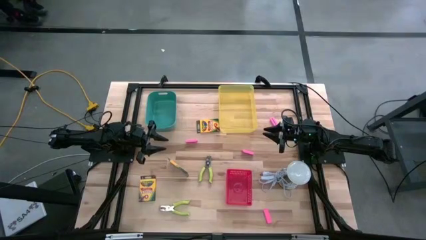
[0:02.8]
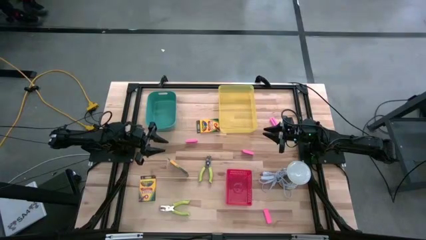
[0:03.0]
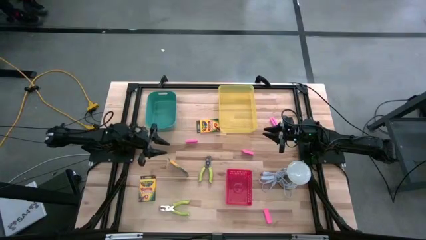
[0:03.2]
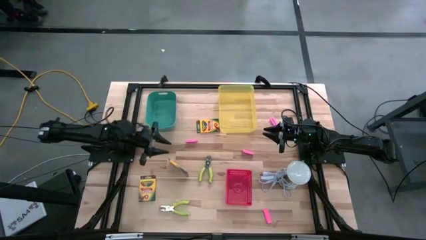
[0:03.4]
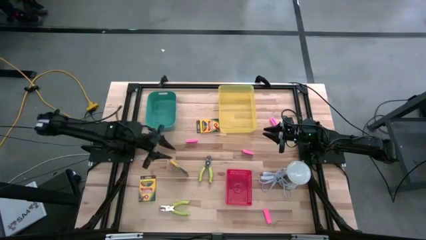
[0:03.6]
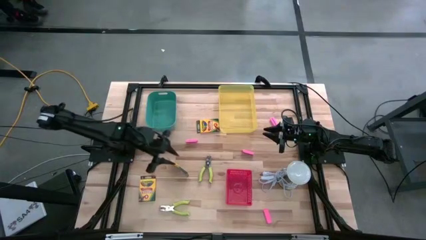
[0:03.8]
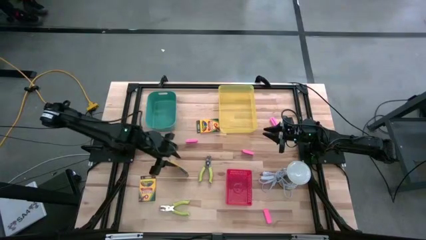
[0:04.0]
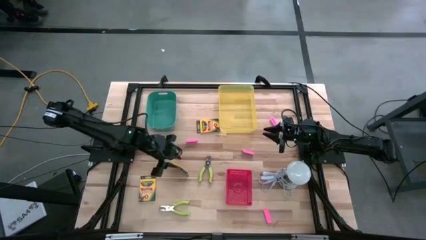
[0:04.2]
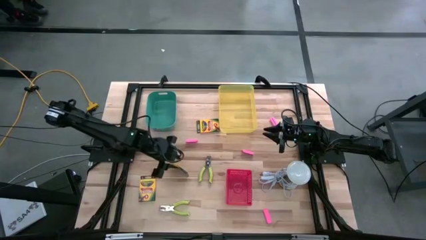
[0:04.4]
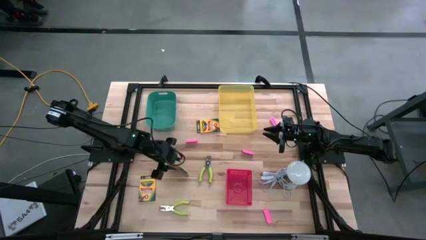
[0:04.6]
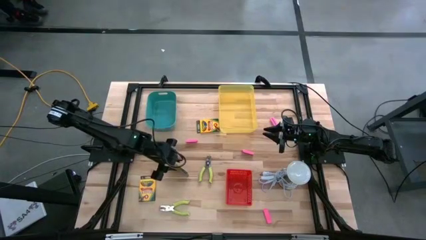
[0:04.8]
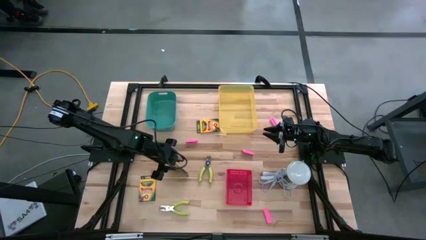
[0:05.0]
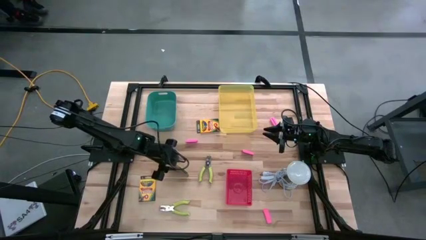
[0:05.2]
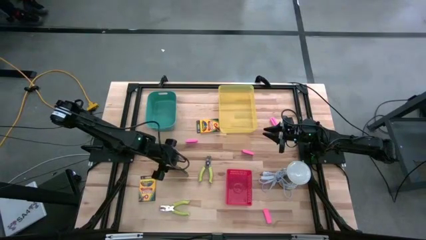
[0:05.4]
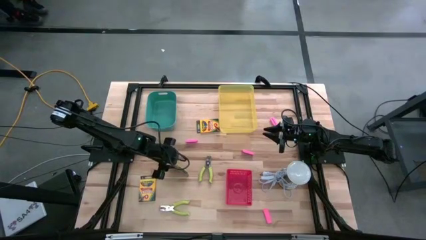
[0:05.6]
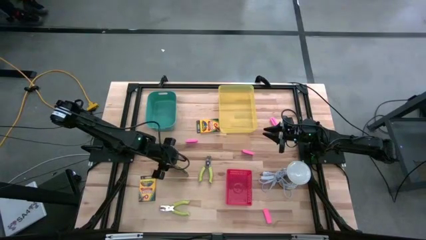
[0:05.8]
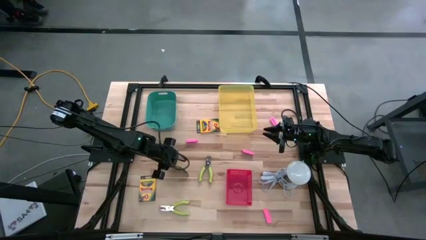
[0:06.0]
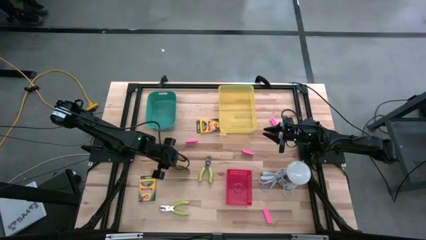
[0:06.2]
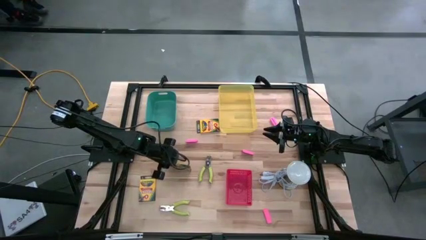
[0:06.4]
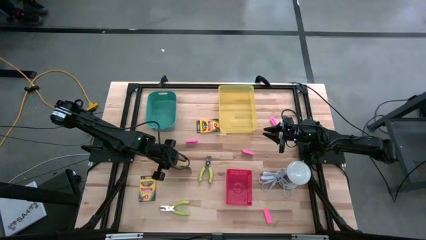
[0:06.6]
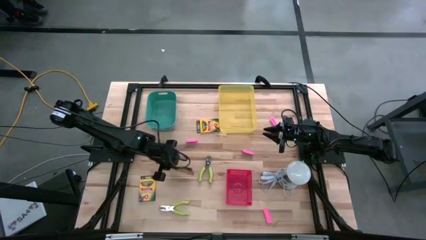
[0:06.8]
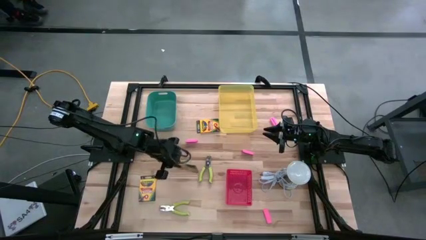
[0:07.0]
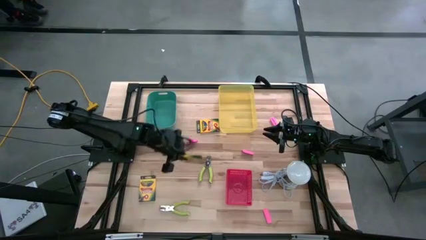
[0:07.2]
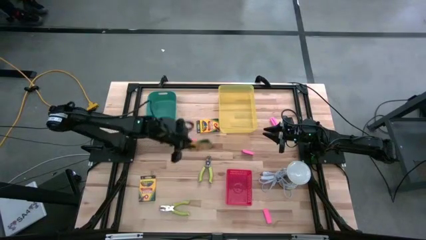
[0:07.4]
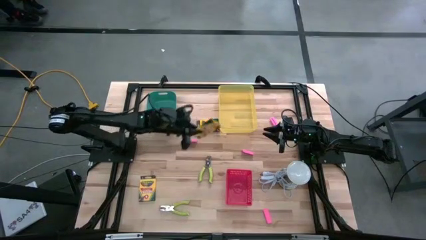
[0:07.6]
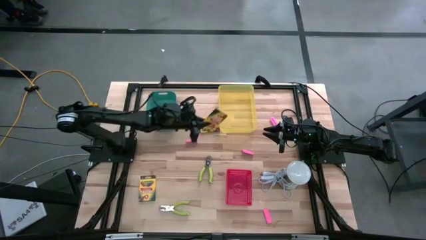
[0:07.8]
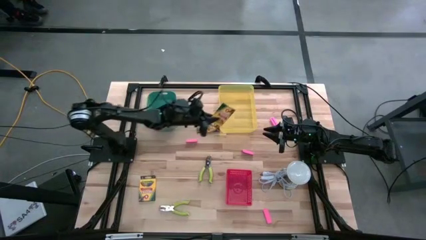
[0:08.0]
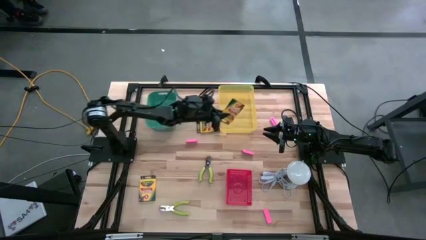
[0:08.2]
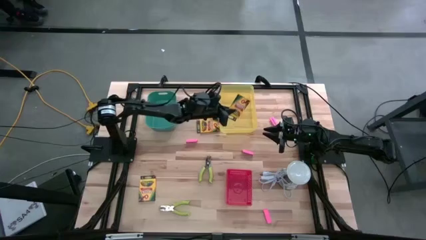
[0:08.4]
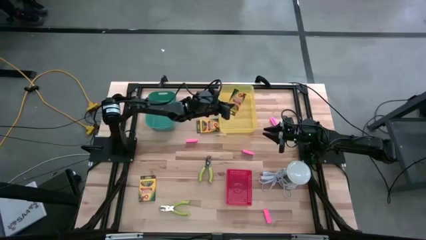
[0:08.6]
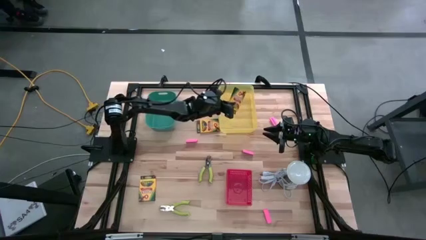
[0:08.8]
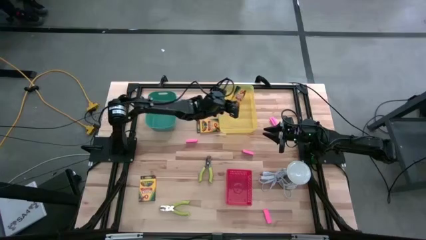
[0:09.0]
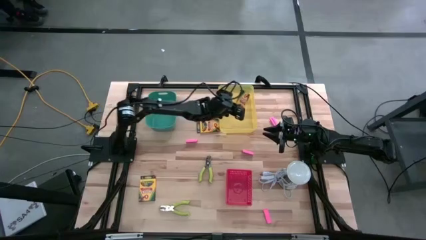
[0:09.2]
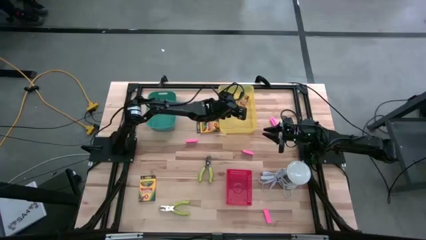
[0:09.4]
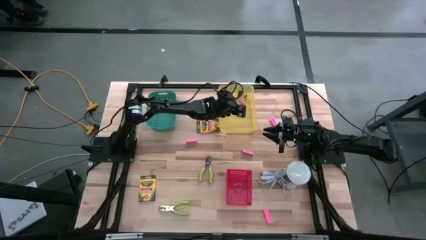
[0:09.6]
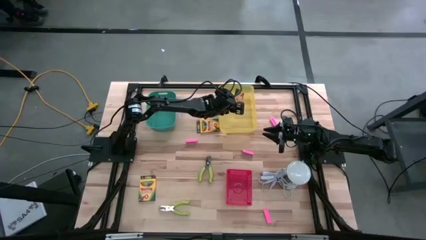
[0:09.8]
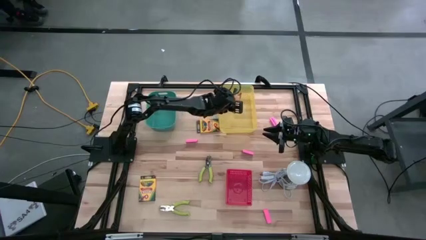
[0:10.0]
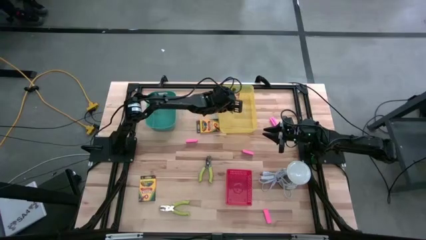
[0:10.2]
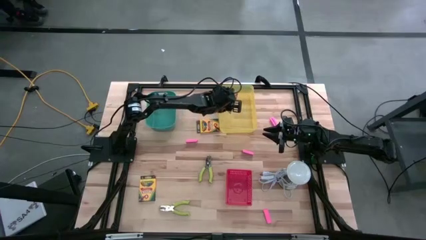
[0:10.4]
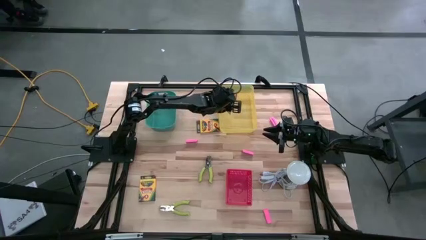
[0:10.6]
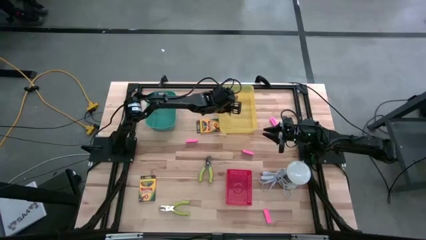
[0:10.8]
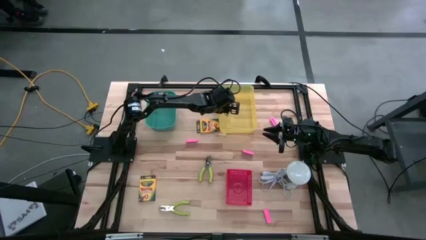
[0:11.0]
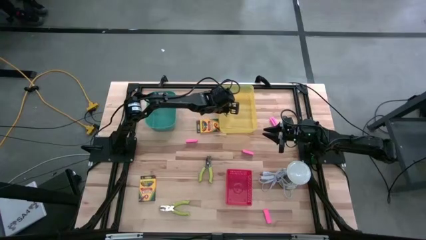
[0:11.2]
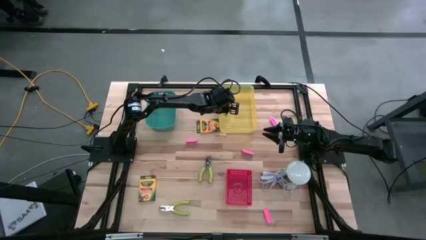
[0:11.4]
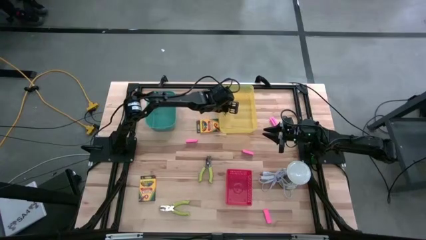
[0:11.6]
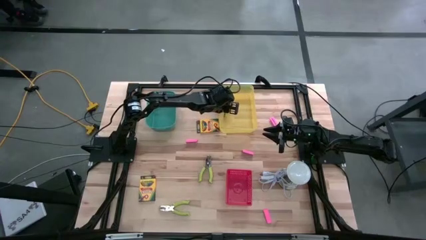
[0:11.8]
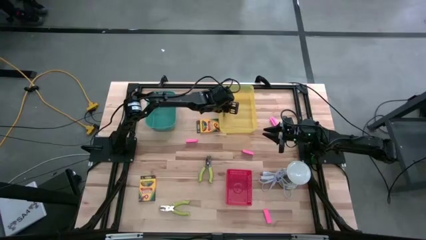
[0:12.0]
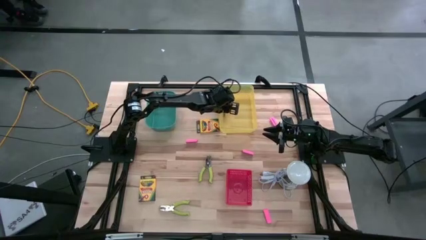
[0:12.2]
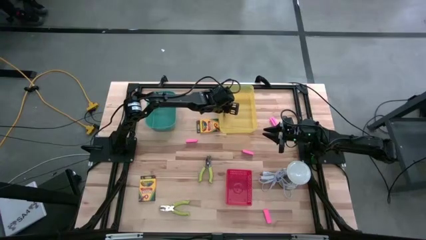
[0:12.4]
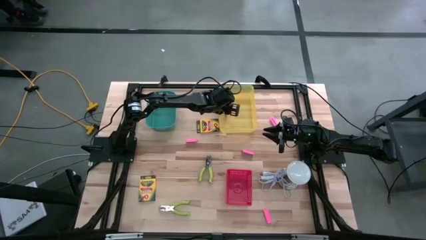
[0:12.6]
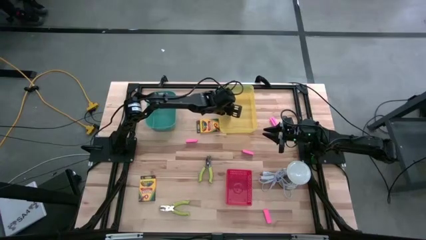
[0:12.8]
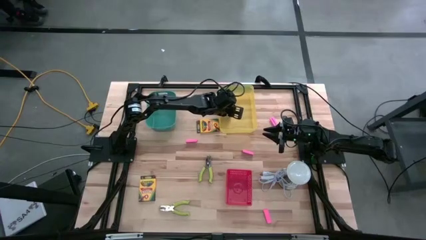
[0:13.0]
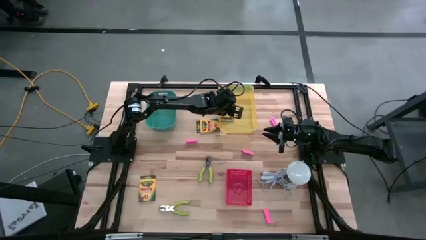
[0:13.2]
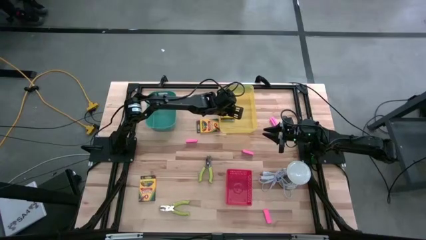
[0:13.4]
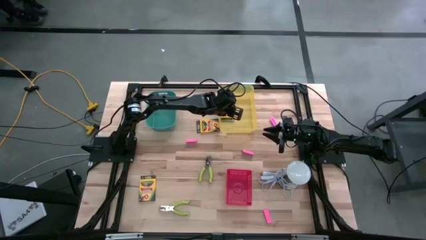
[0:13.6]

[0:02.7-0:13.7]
Task: Pick & Place School Supplies
Put the crayon box into the yellow bin
